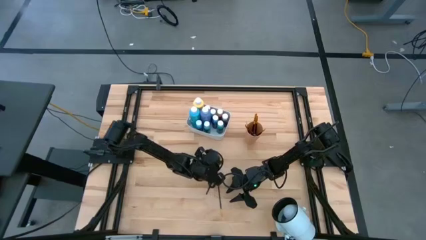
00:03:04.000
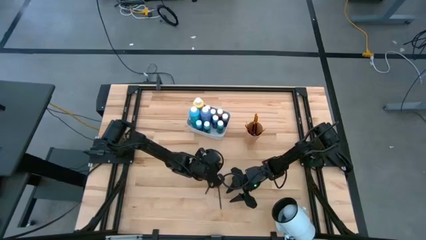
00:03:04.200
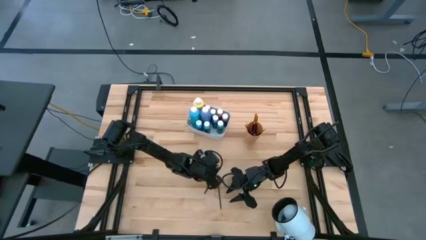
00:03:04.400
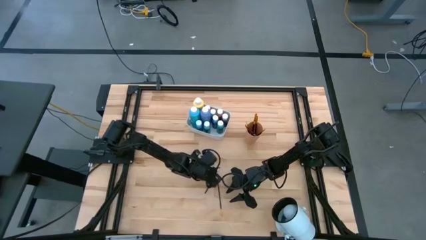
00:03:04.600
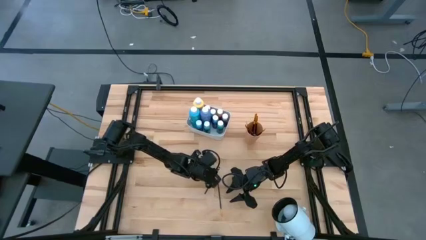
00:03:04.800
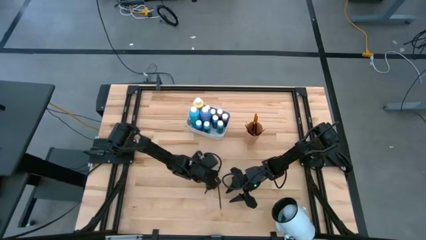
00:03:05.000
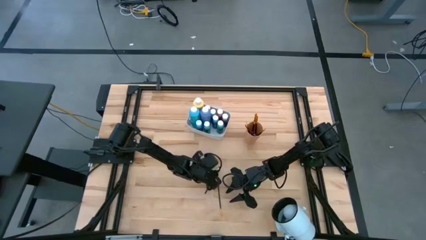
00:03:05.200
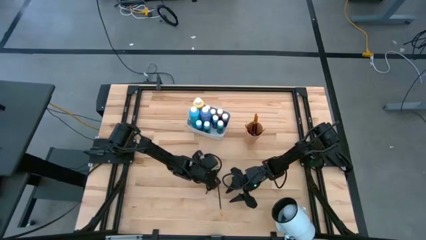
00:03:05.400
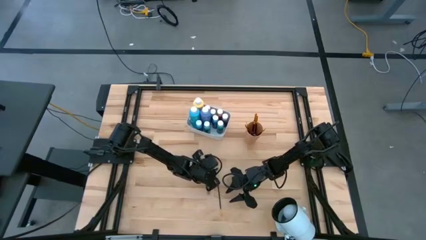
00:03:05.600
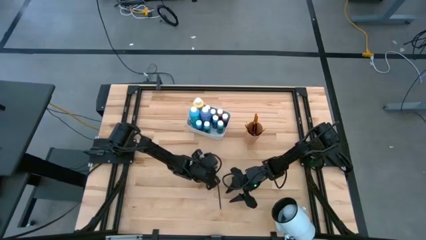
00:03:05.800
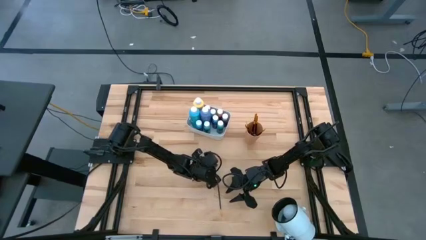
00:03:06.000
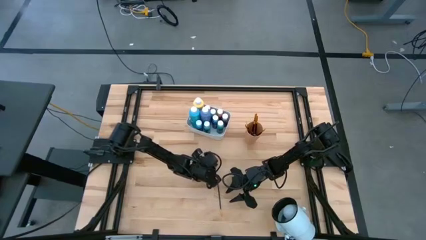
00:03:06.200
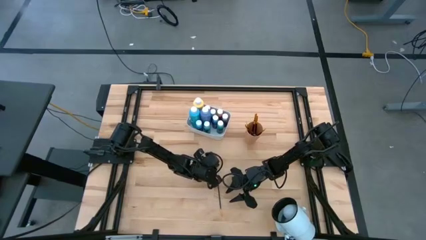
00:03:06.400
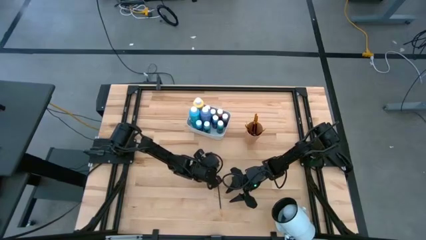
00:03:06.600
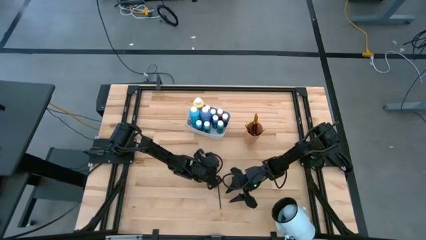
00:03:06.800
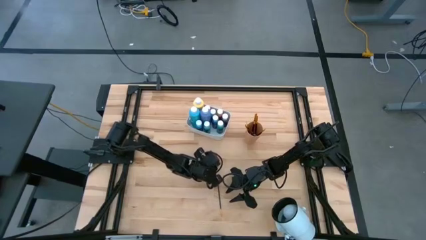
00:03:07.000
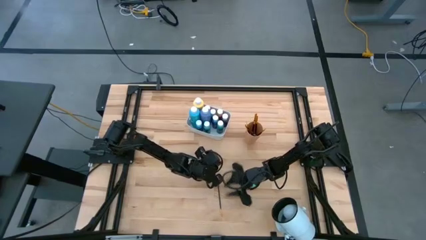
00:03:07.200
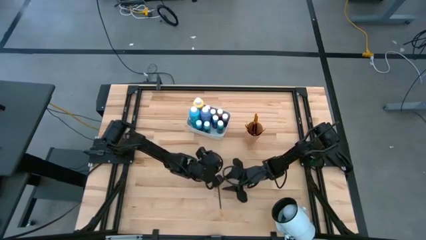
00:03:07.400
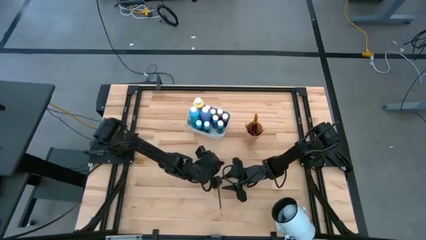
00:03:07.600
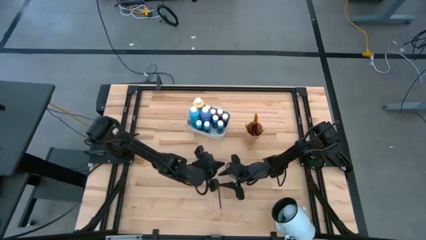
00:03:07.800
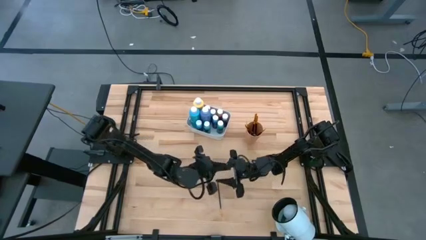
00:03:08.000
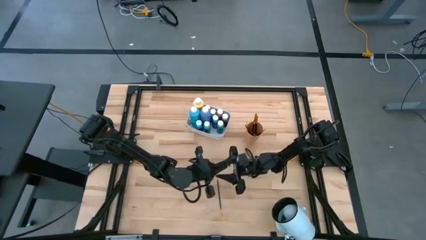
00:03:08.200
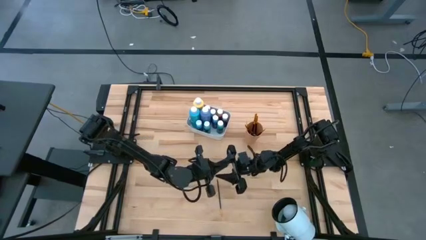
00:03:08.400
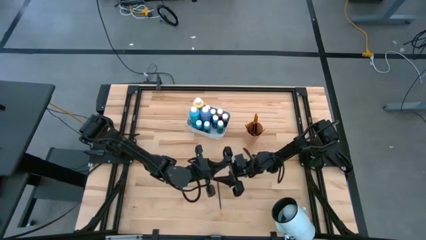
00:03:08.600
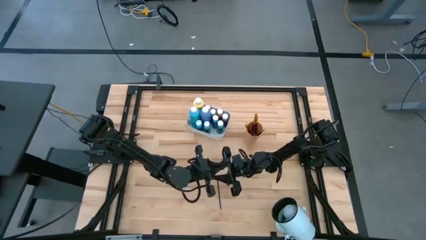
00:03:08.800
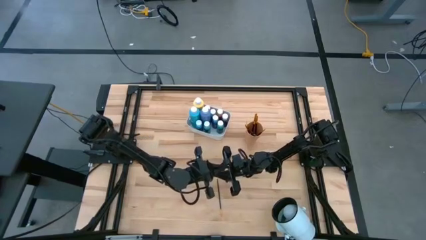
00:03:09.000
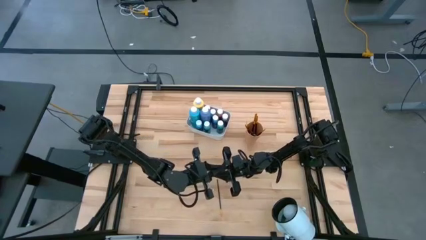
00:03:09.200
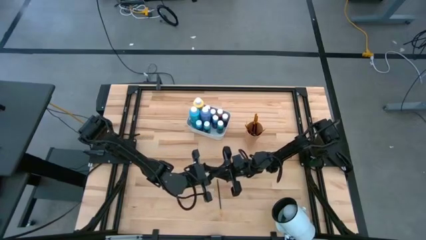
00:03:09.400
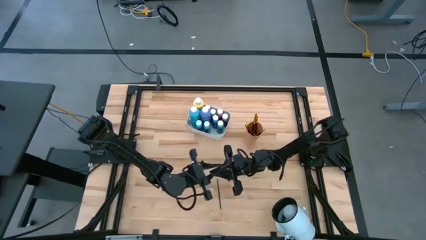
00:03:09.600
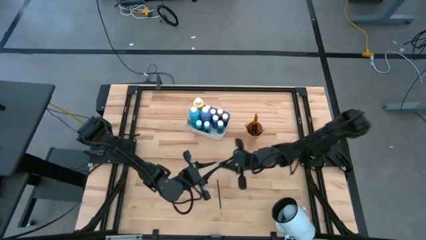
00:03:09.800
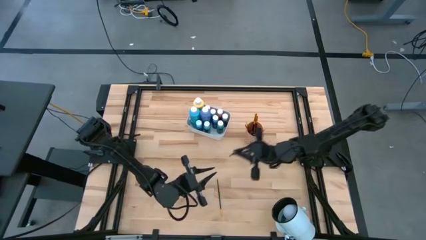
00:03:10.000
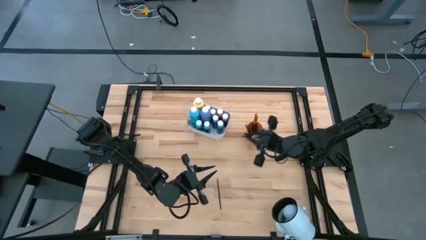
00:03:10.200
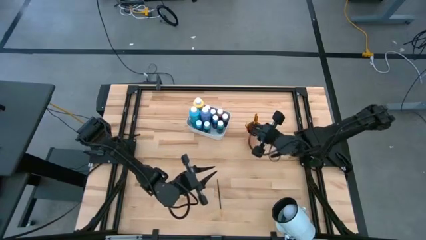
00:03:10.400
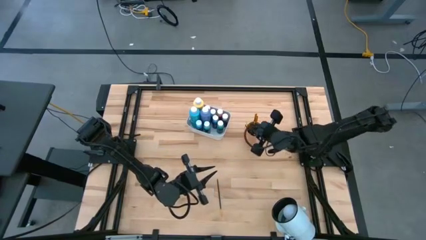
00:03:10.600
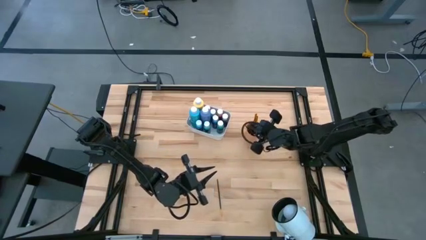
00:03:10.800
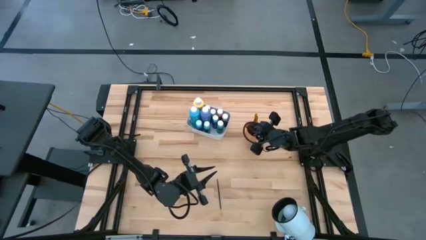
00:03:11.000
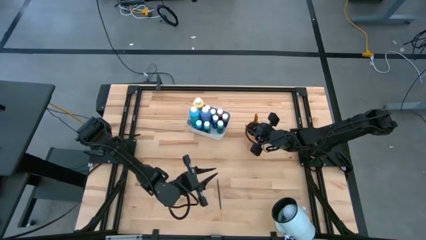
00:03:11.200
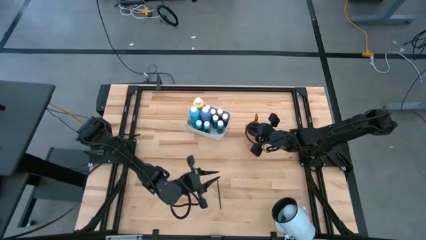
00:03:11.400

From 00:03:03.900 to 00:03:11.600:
Task: Pick & Place Paint Supplies
Put the silver paintbrush into the cup

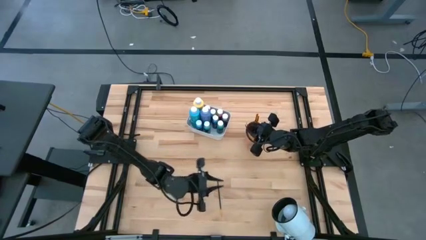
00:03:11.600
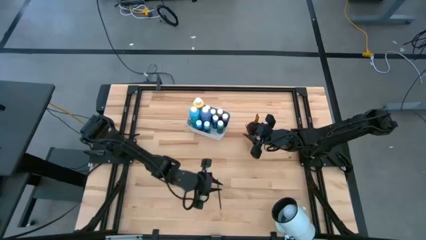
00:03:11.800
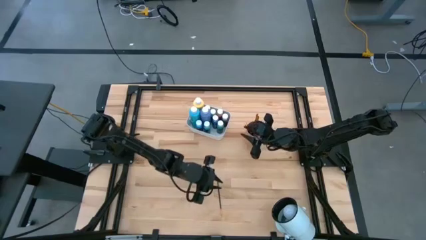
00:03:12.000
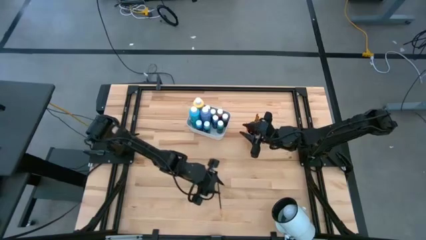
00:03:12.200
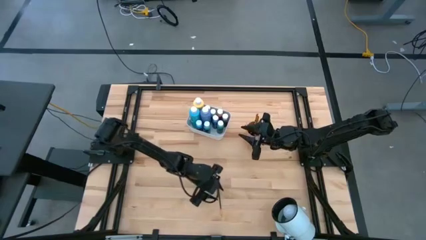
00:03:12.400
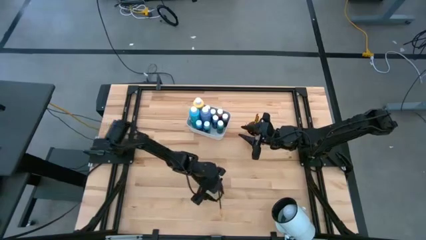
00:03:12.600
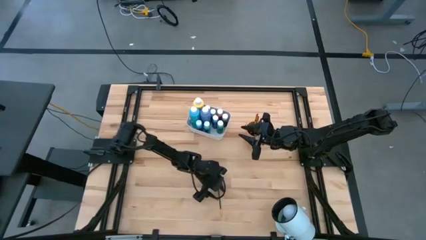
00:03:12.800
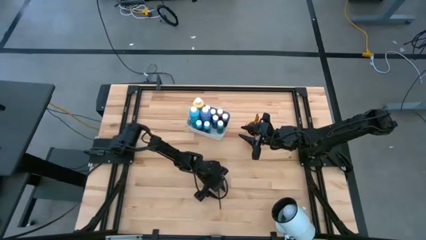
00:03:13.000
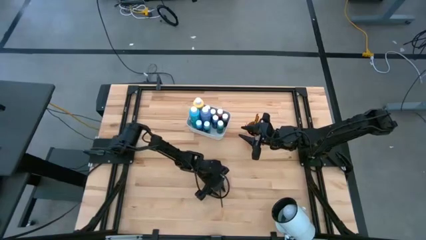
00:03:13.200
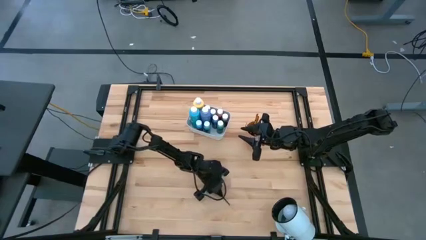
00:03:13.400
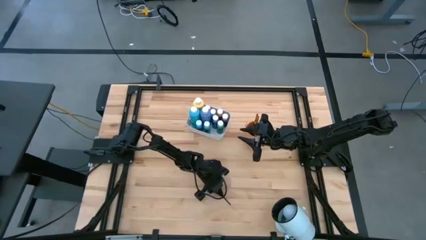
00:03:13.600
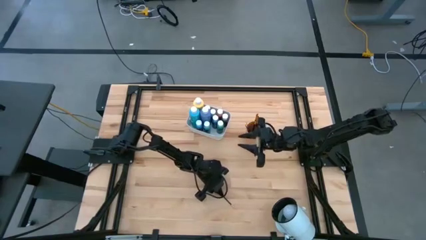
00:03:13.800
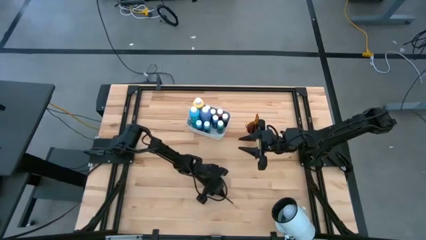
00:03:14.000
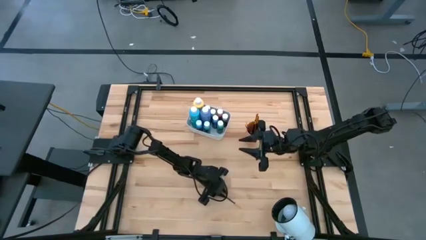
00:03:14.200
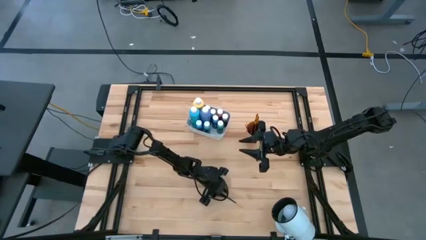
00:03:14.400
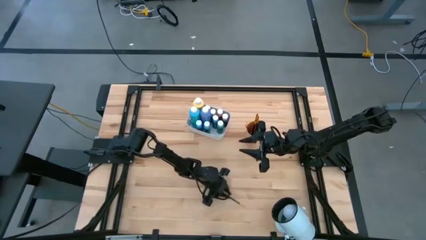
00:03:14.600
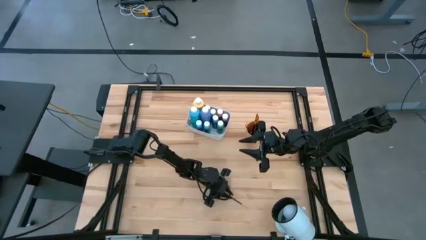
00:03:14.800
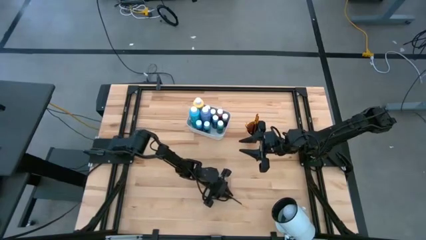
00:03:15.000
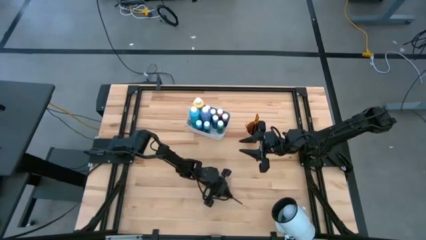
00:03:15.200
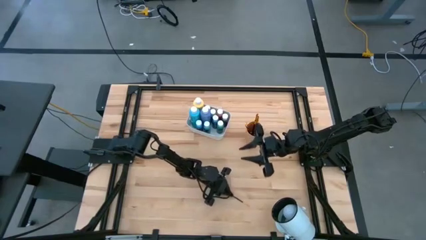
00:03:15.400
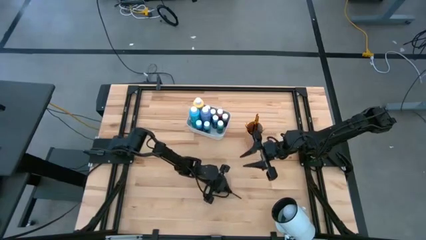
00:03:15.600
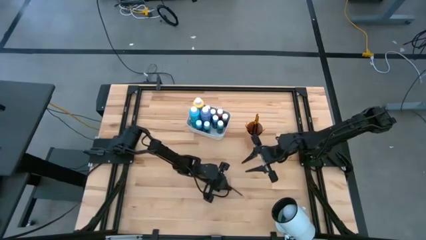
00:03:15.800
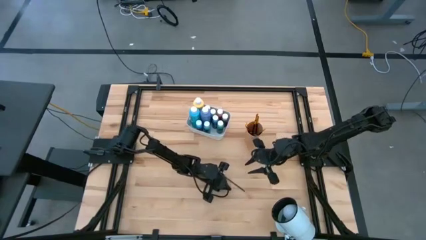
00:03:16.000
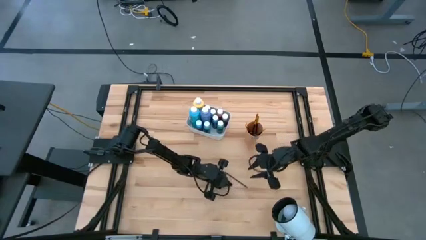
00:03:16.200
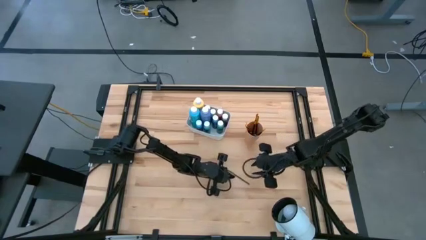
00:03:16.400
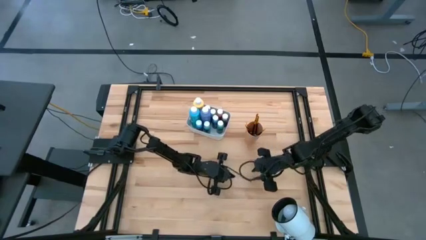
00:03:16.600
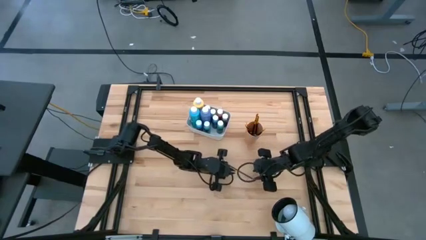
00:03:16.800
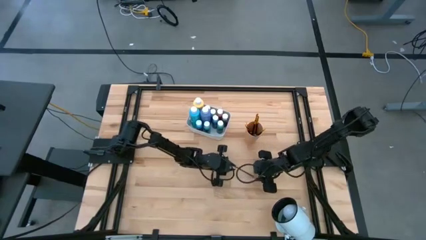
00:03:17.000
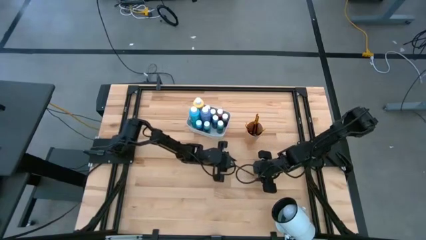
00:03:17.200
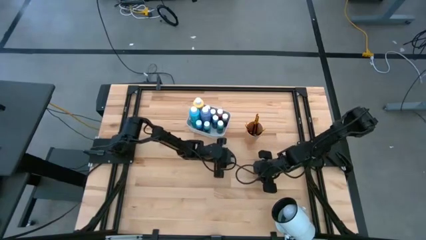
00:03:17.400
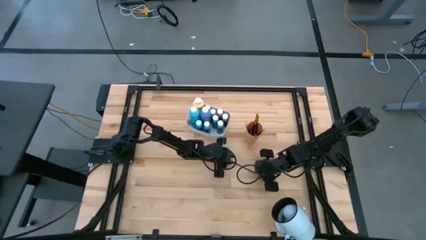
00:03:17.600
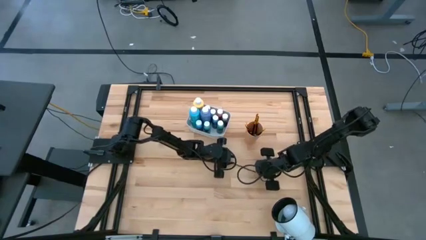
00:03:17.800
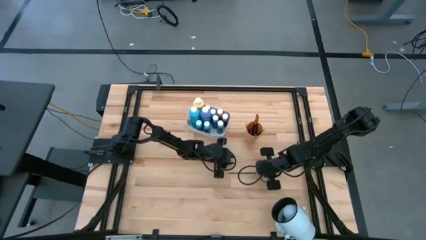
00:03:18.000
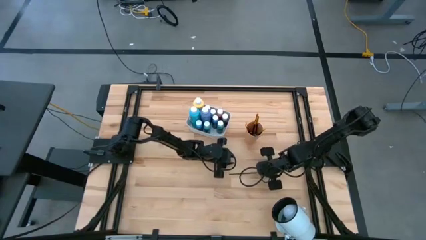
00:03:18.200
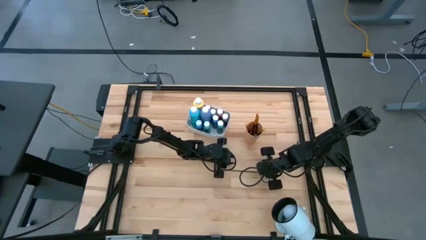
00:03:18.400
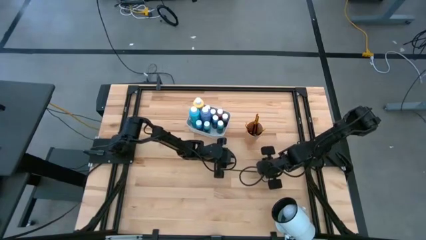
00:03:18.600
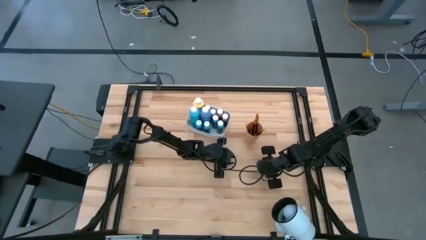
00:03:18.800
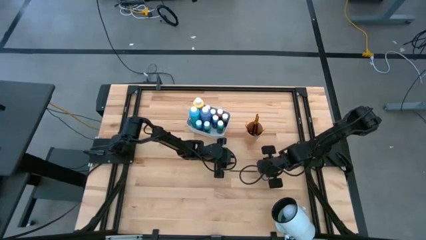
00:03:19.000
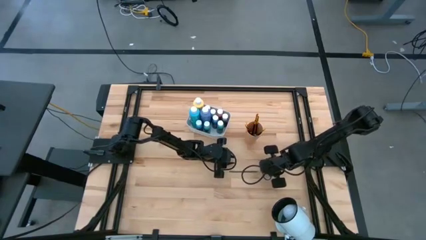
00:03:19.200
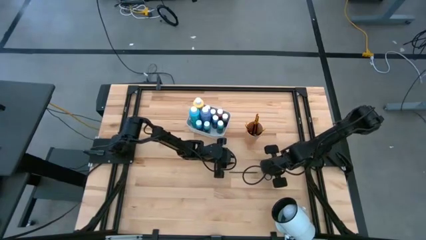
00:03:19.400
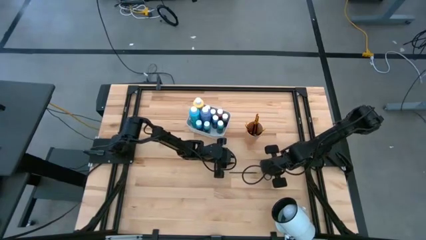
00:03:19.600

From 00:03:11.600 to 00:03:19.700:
Put the gold paintbrush into the cup
